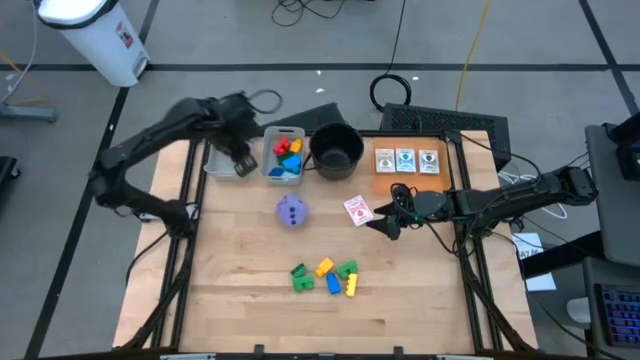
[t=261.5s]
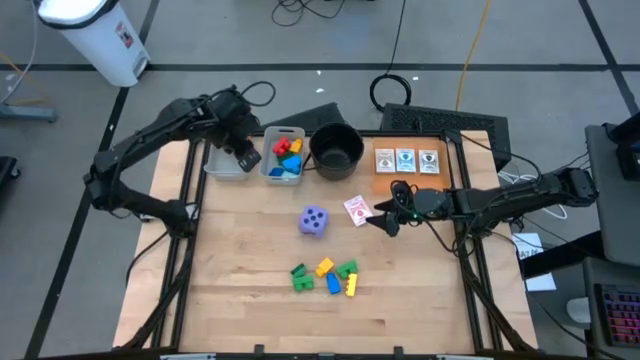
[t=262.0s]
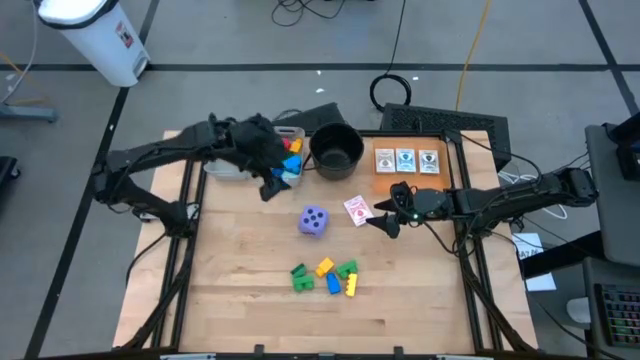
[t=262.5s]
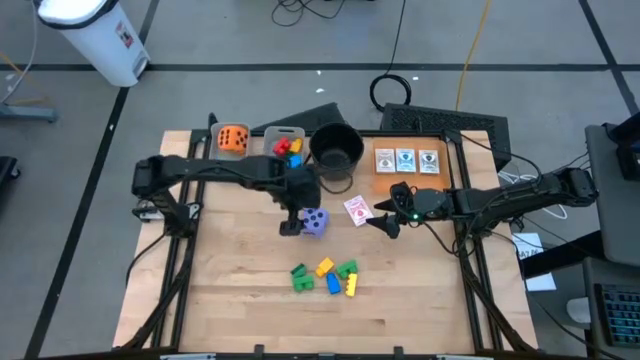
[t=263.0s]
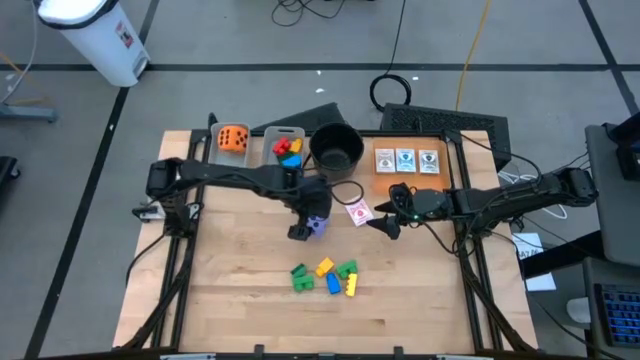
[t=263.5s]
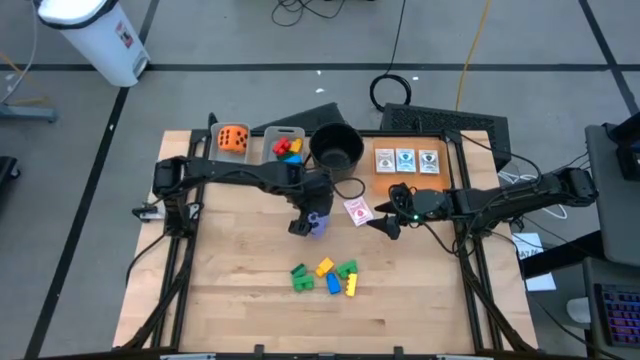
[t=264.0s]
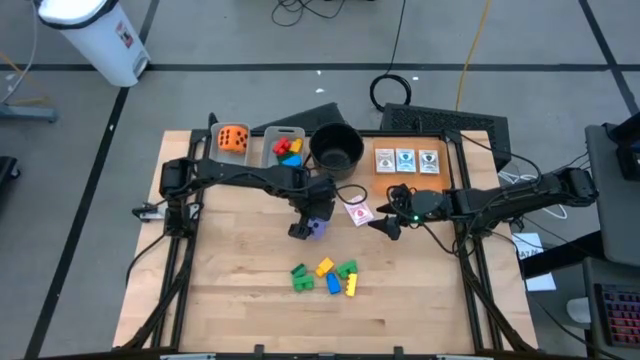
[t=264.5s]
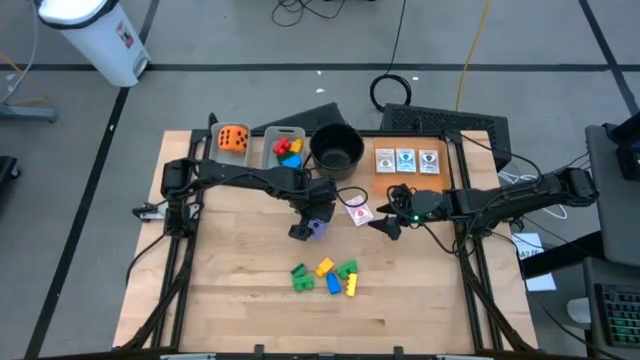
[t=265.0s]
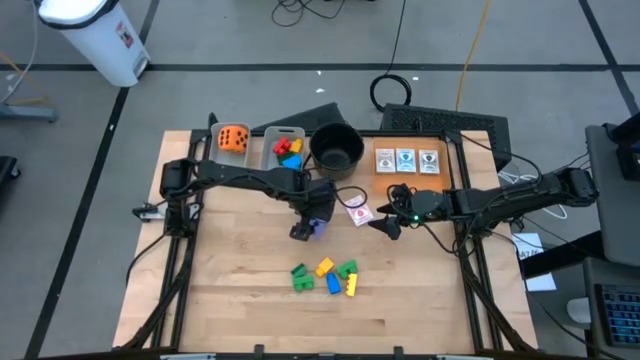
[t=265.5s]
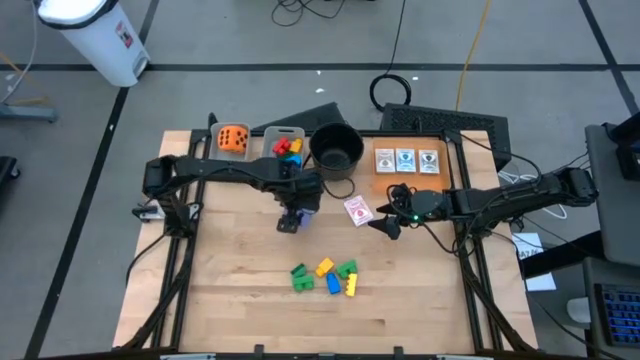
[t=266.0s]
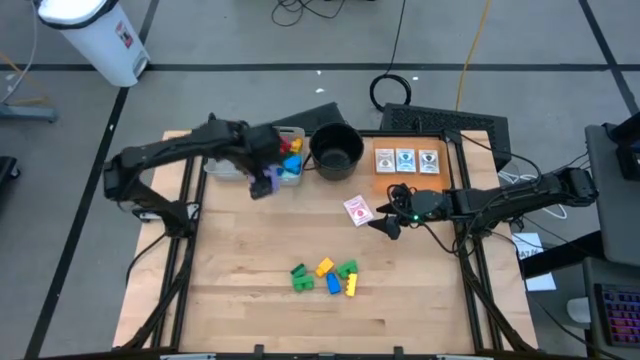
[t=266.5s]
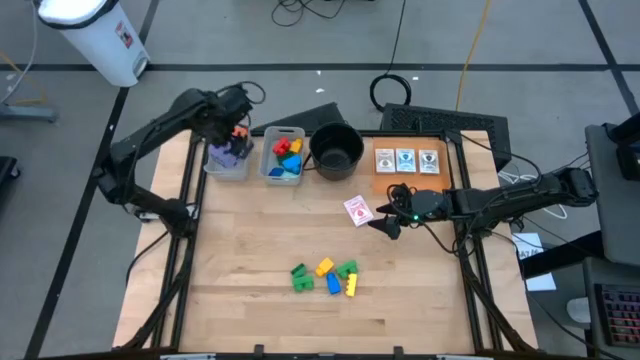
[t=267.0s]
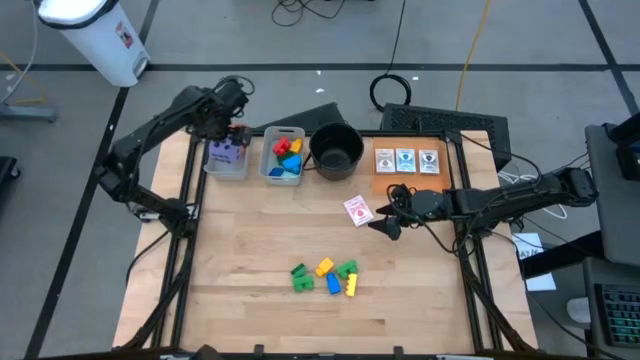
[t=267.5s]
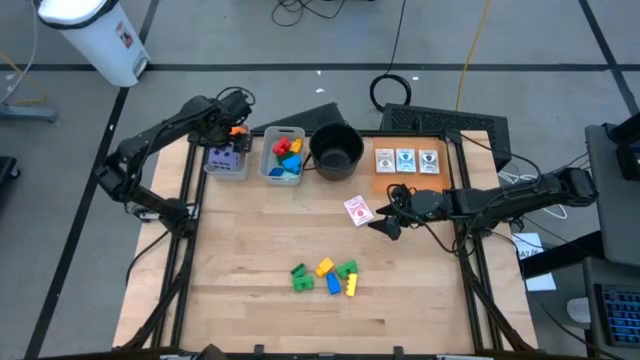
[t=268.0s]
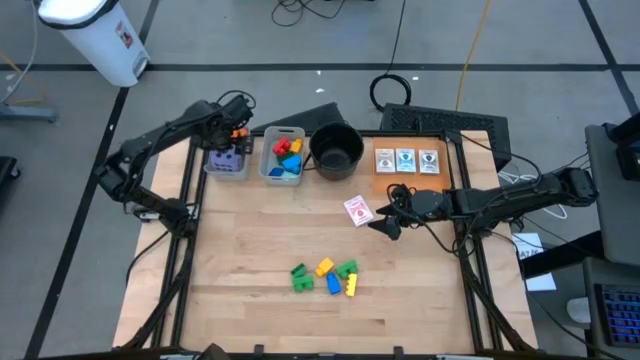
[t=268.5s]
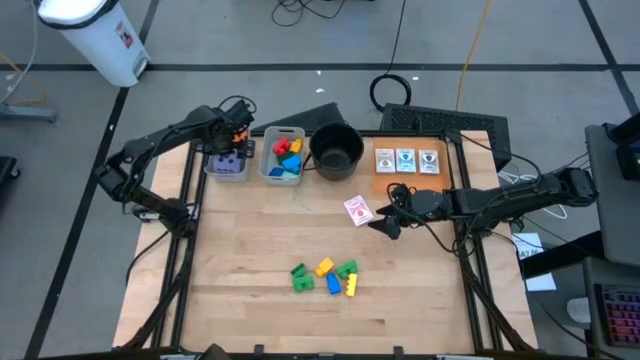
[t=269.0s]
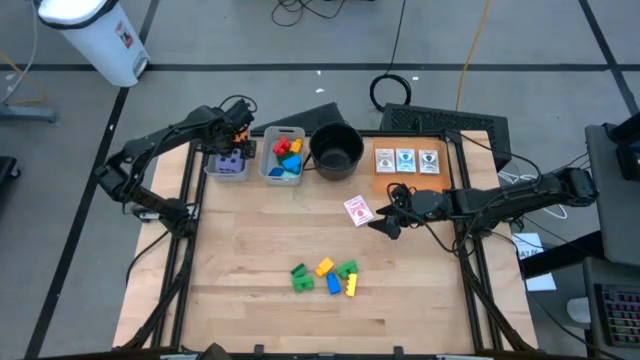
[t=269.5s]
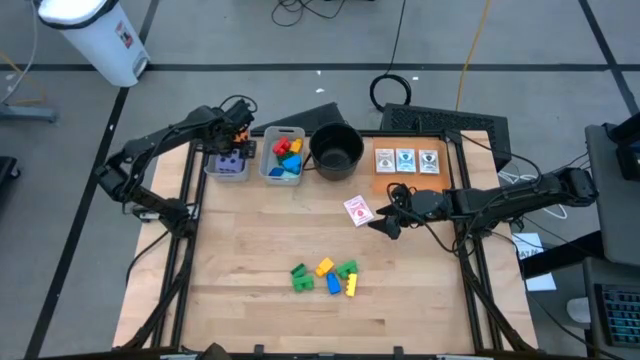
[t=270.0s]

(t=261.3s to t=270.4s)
Task: Pick & Place Toys
Put the purple die into the left gray bin

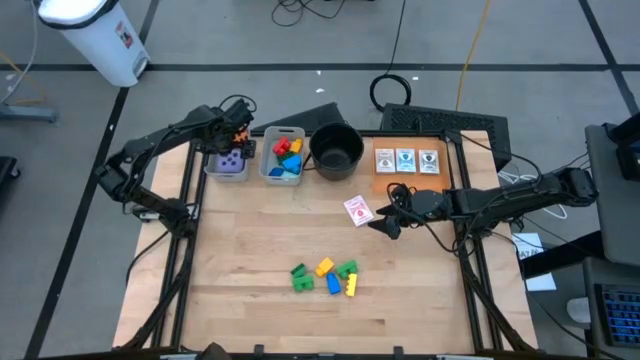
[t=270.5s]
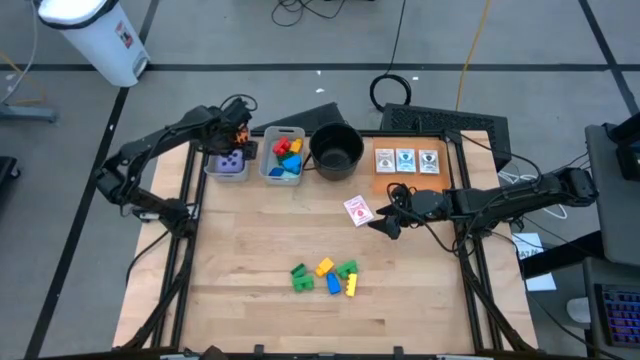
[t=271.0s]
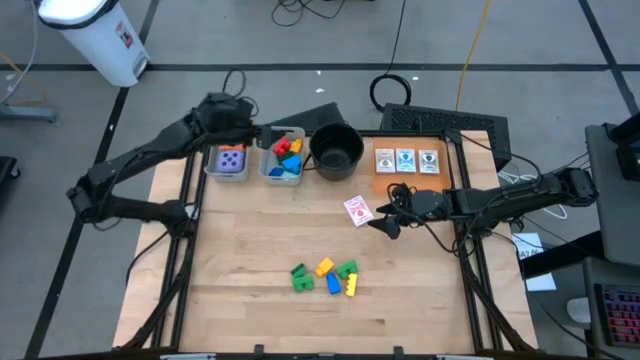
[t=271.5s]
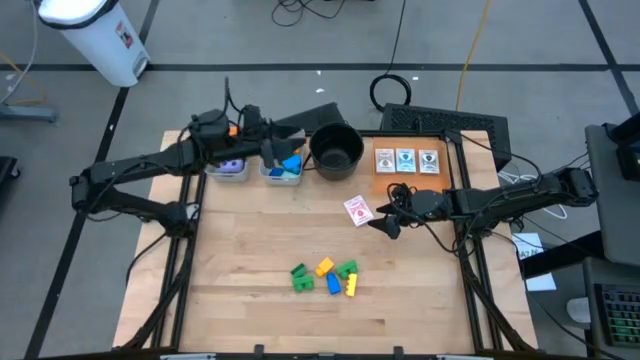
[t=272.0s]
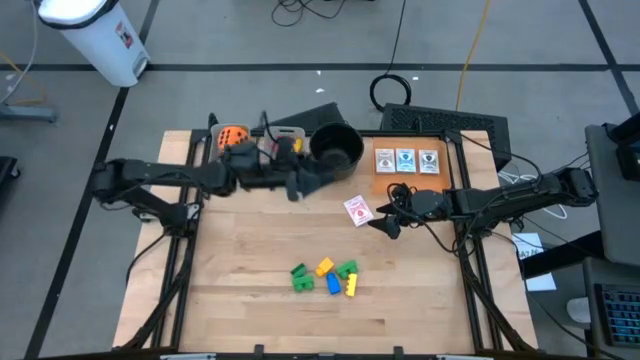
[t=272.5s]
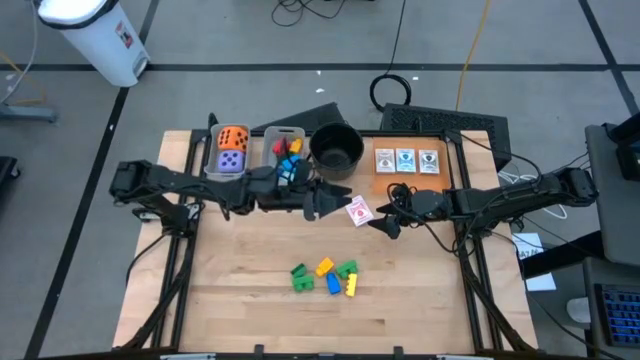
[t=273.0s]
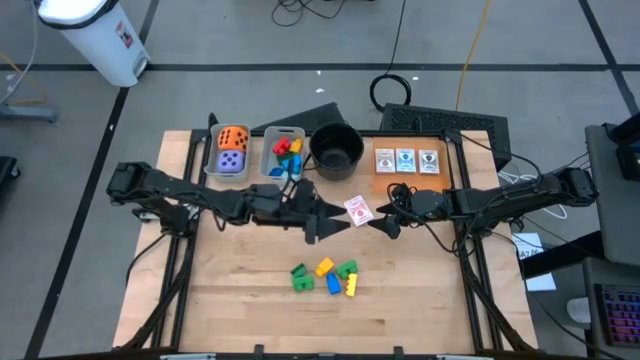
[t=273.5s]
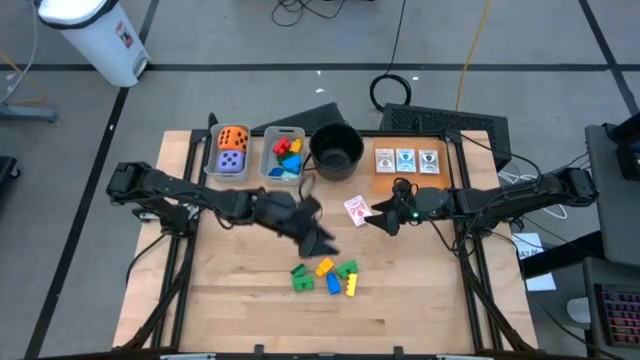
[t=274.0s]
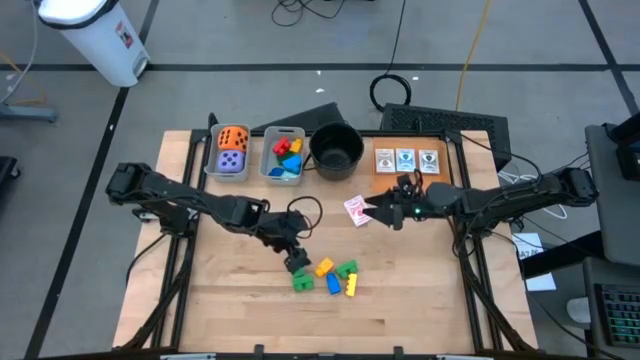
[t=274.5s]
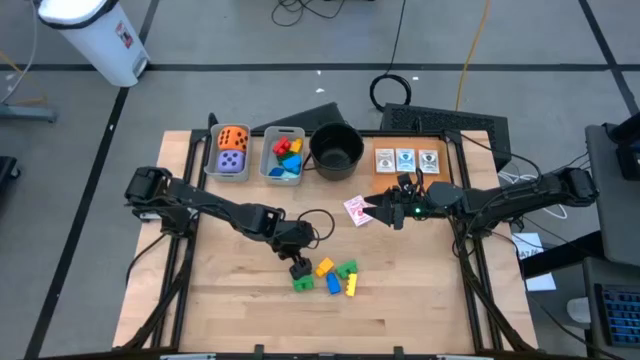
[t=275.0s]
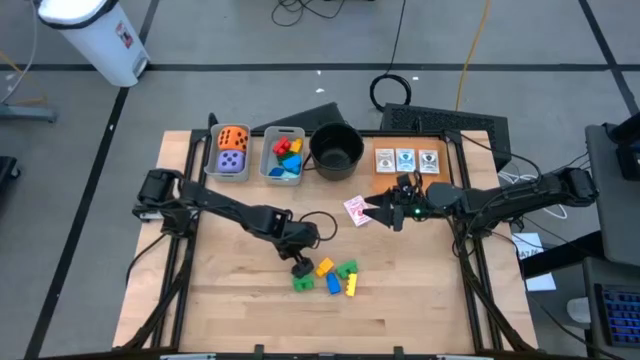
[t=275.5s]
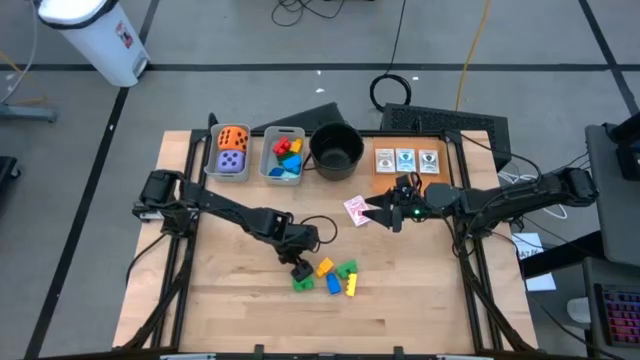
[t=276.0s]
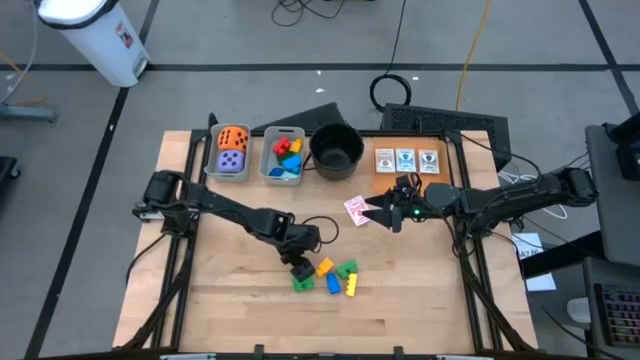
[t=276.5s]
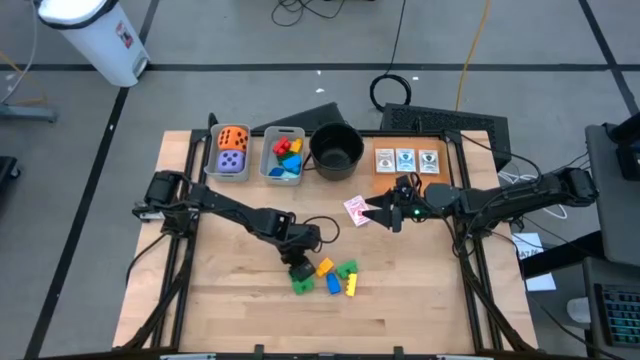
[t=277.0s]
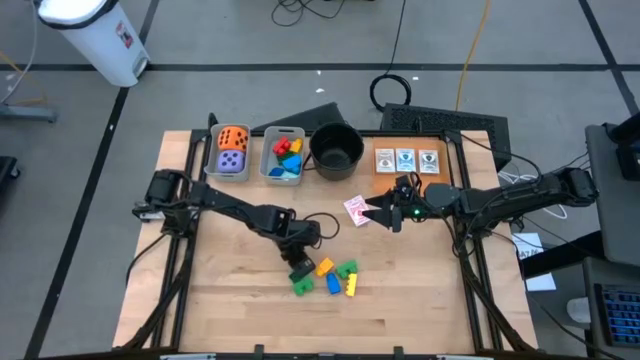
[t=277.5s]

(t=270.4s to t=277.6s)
Put the green game piece into the right gray bin

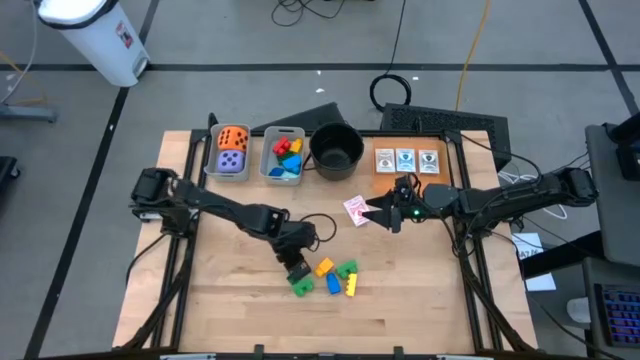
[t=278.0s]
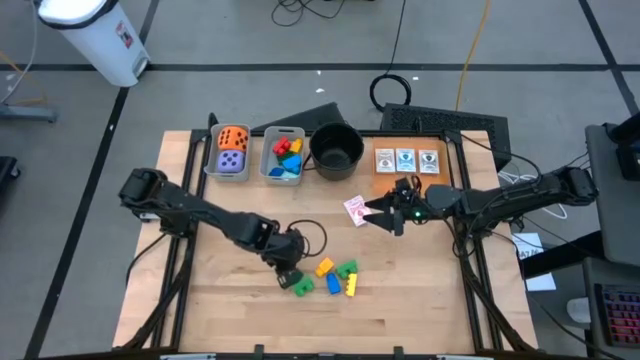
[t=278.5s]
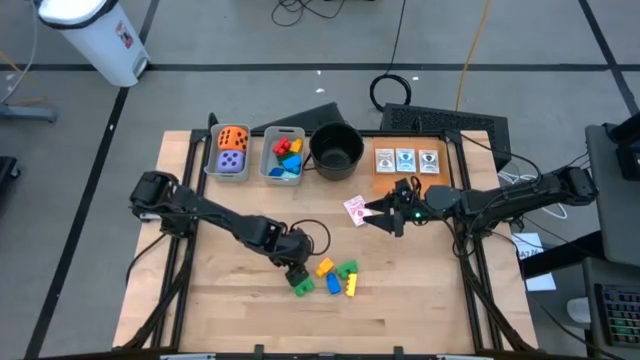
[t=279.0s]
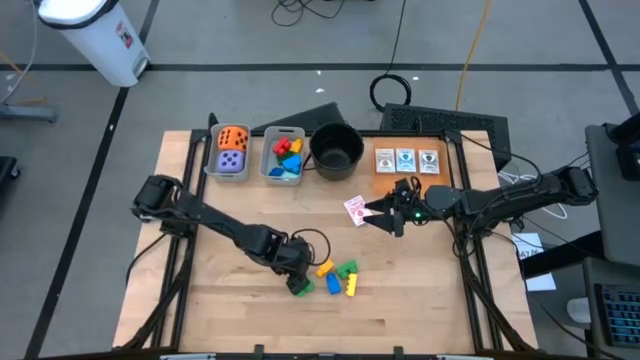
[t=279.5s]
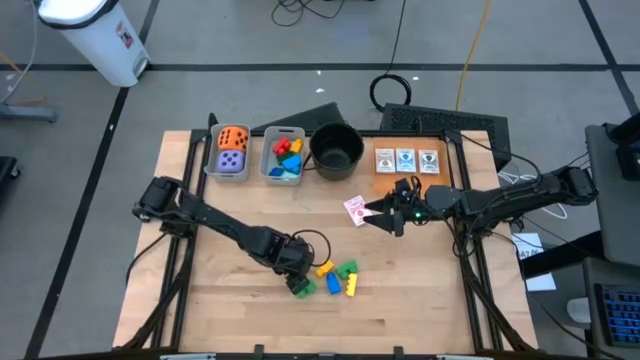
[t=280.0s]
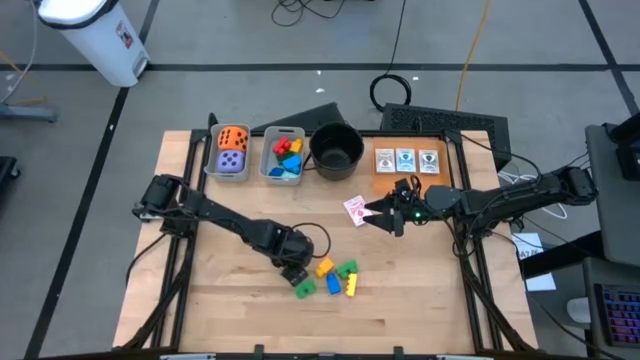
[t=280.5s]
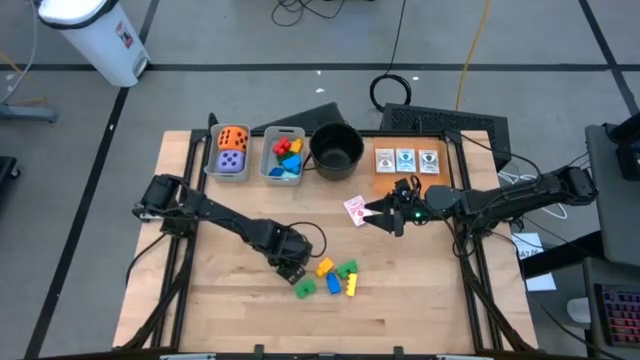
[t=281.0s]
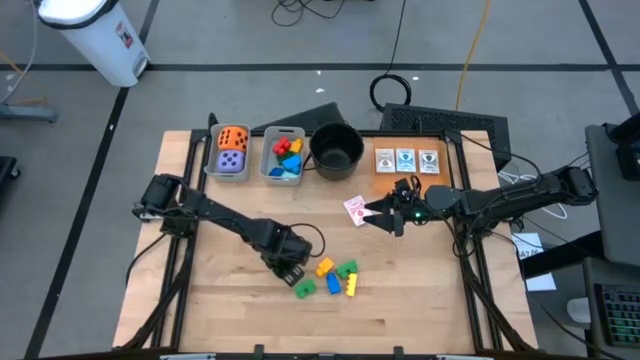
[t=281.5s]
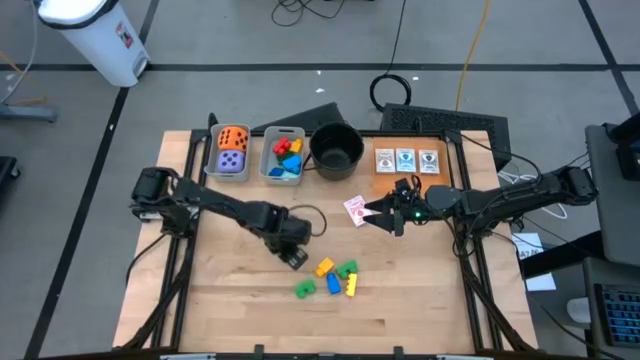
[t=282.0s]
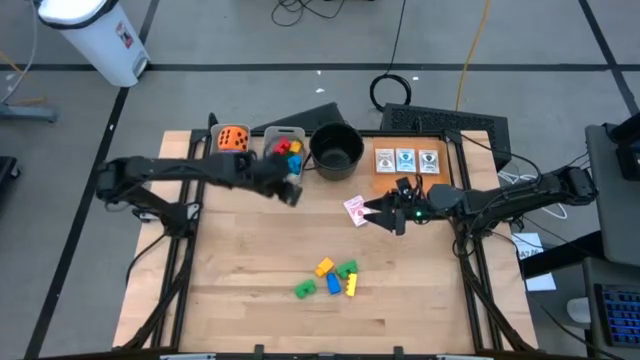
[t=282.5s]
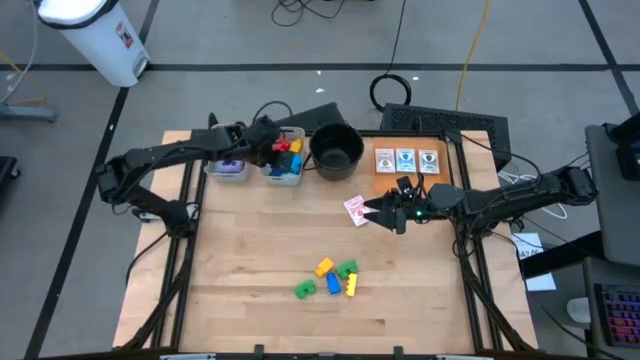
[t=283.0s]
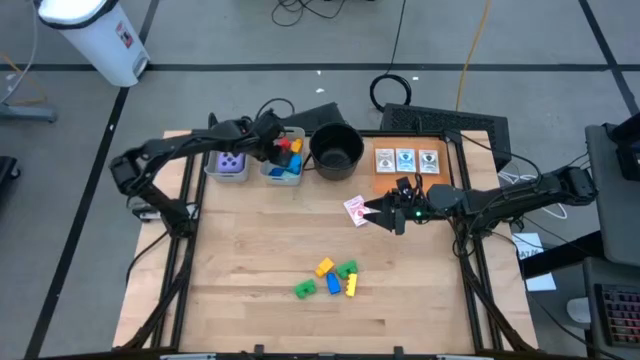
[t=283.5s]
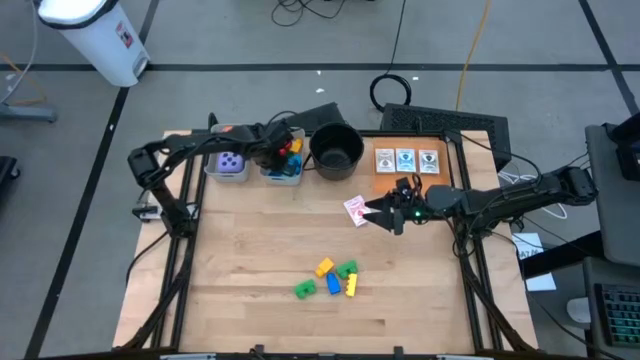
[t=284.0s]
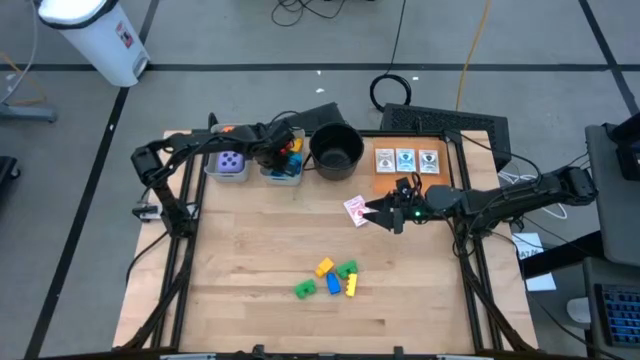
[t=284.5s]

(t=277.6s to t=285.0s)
Put the green game piece into the right gray bin
